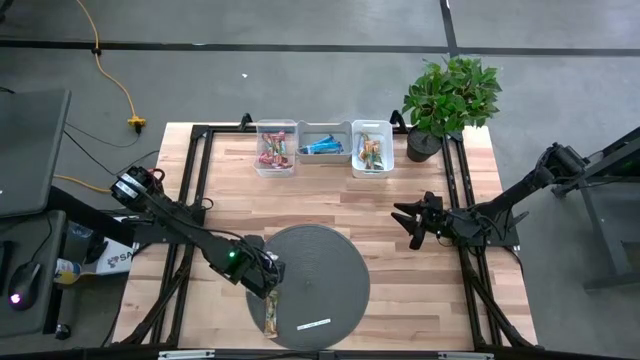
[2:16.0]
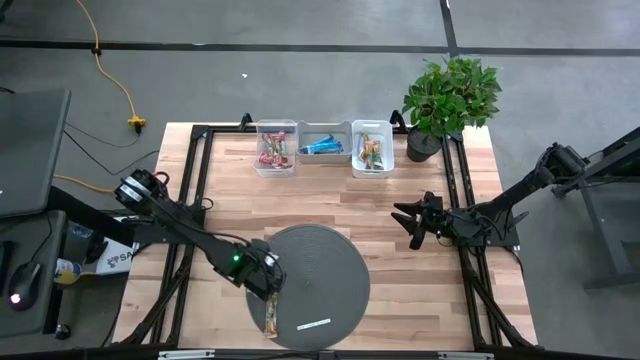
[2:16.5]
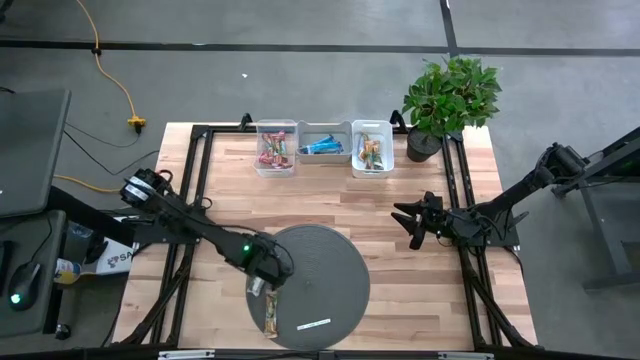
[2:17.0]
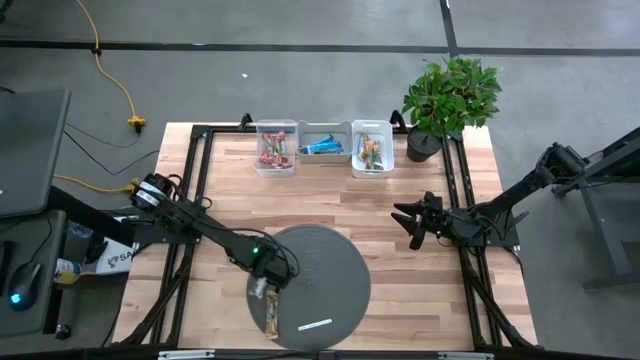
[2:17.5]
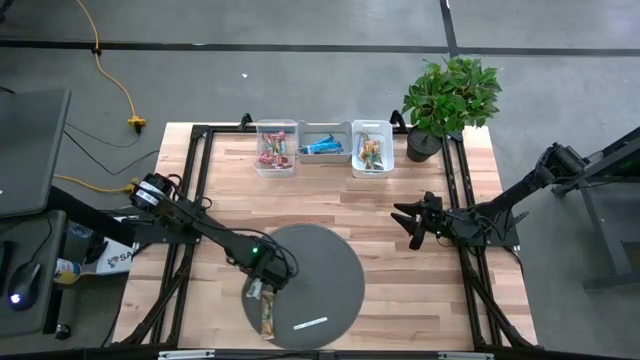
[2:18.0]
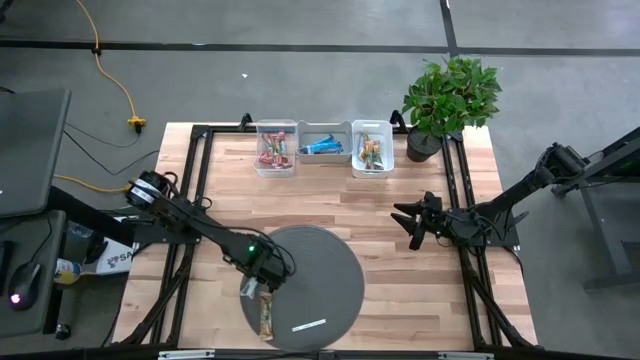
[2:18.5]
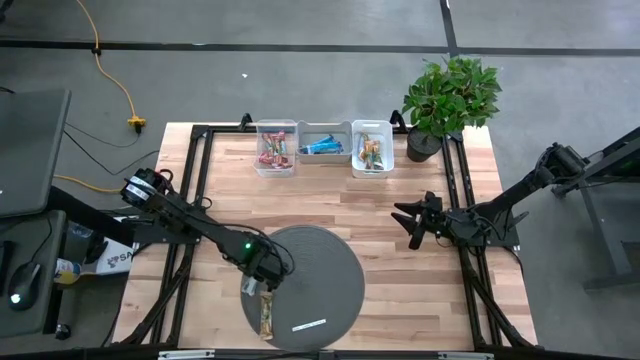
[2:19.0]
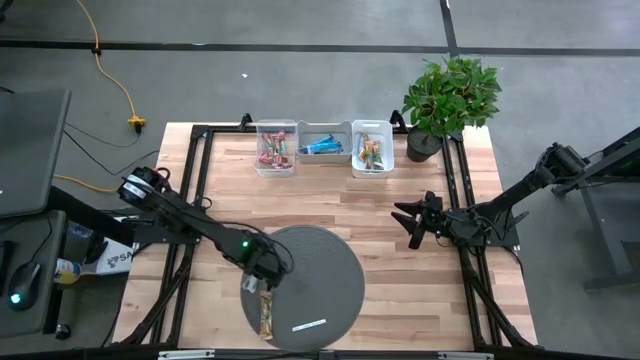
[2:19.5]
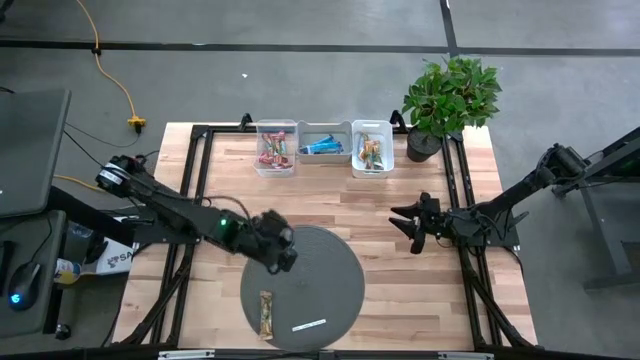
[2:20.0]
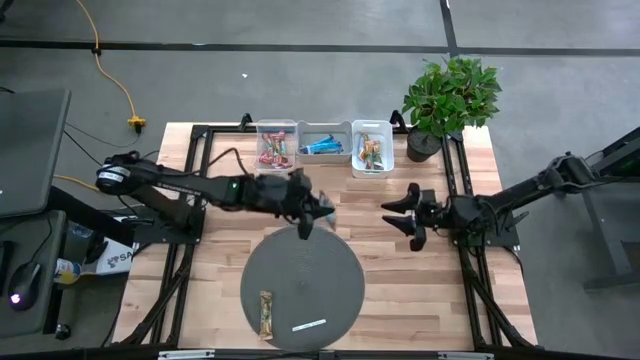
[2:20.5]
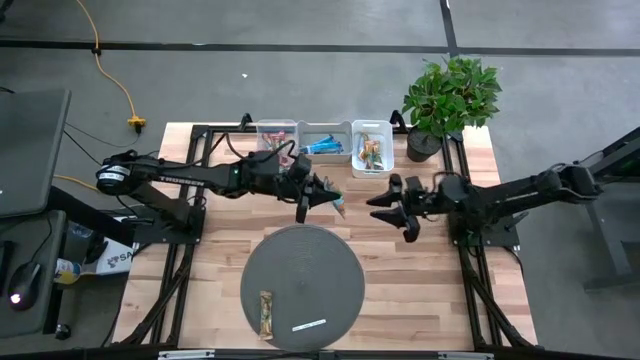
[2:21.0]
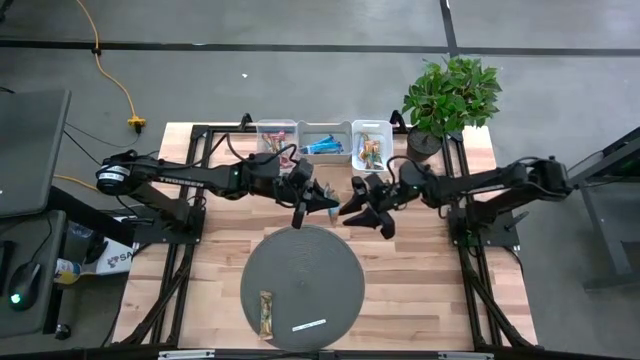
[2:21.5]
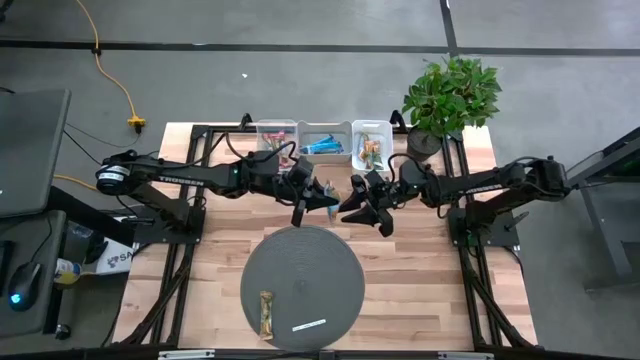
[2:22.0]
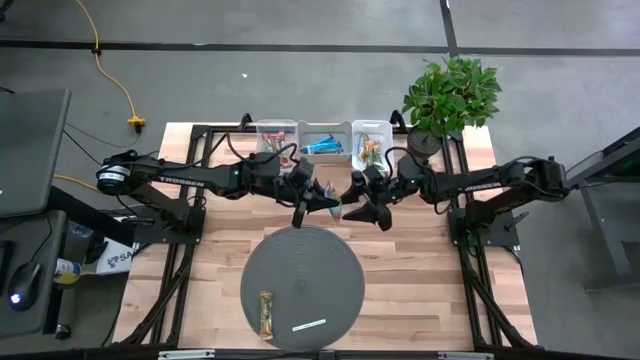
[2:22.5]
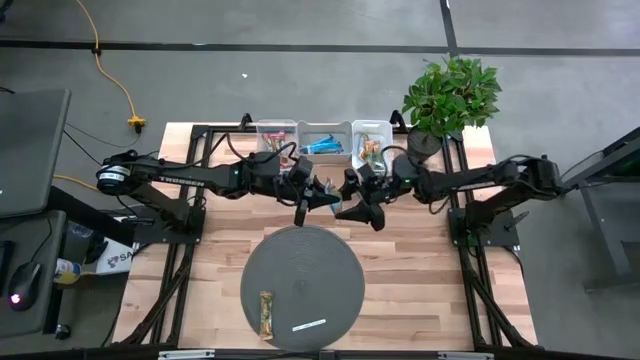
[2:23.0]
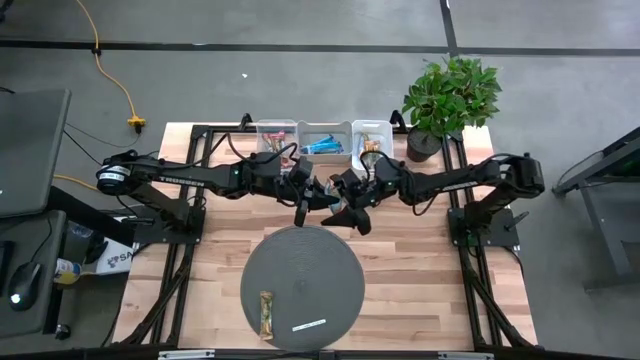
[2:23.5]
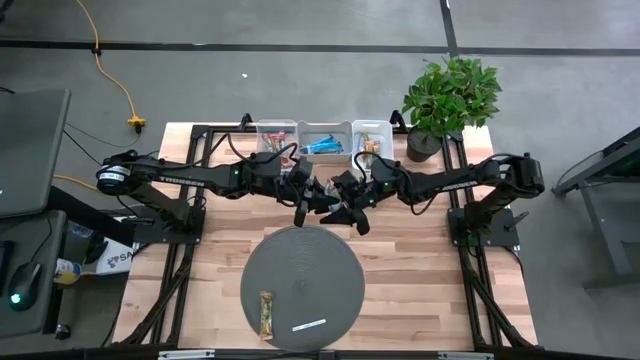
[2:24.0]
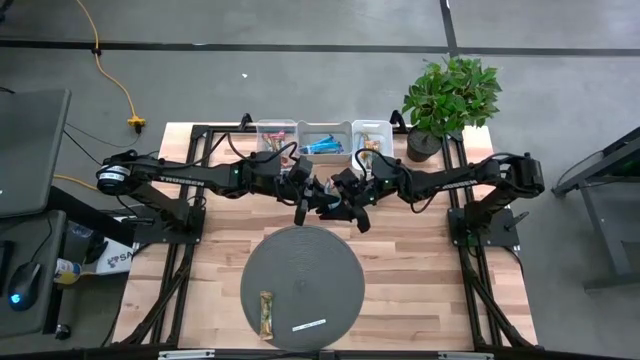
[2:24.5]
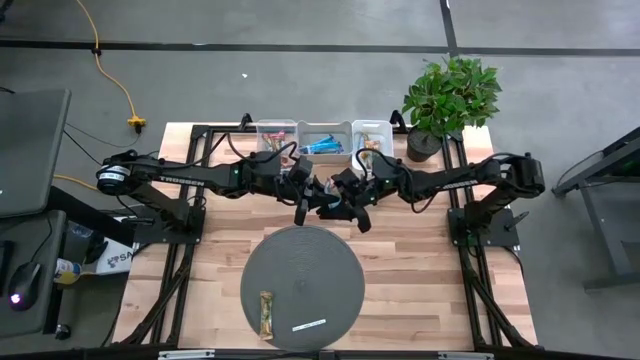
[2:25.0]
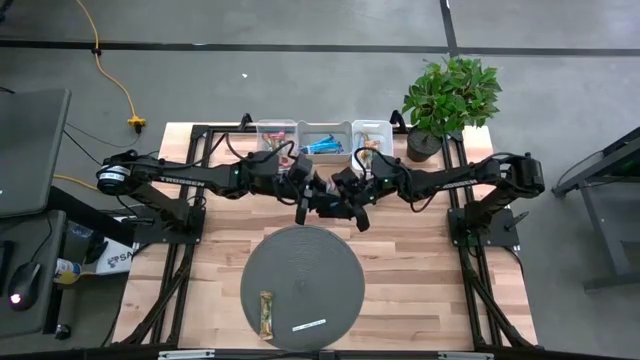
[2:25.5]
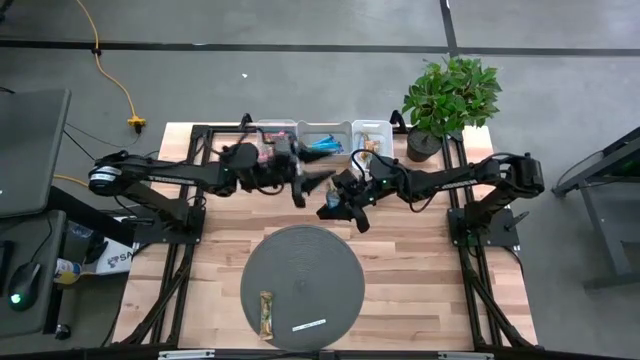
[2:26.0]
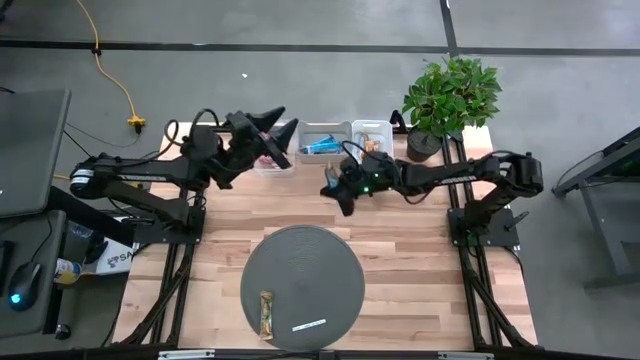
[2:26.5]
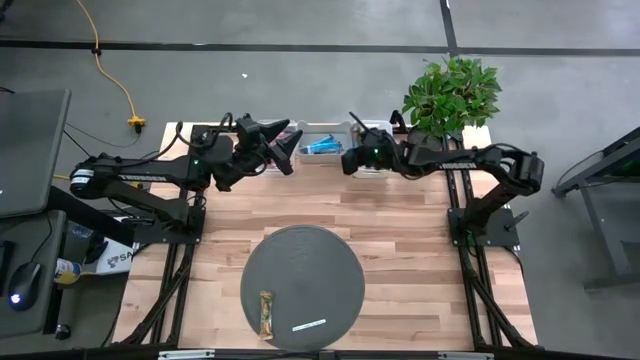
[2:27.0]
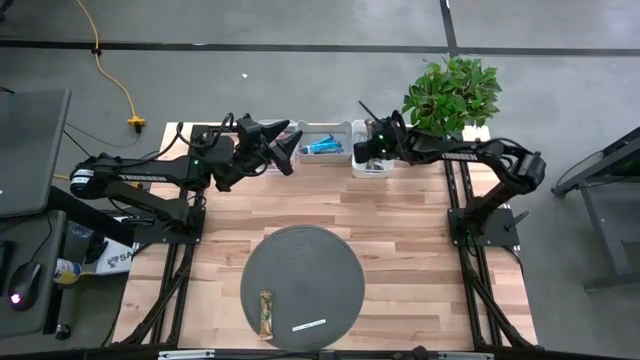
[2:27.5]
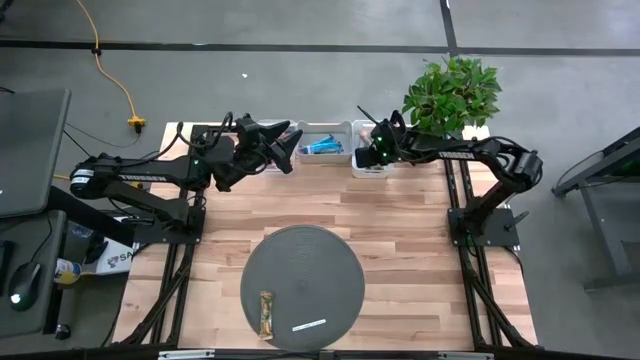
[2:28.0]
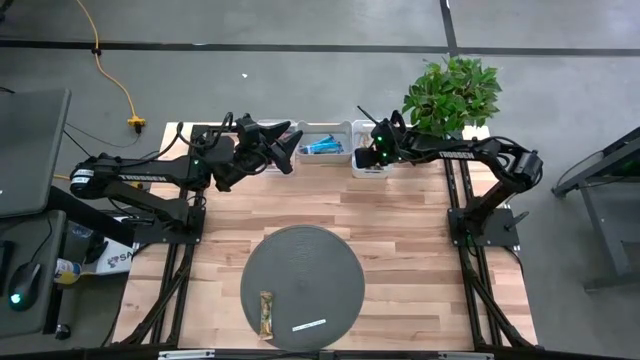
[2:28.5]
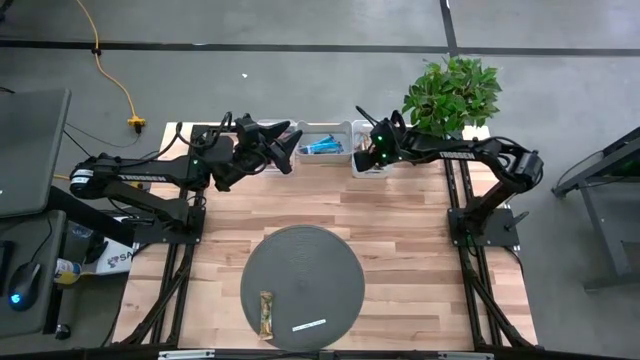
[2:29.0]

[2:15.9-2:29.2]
Task: Pick and place Granola Bars by type
Put the left orange granola bar into the white bin

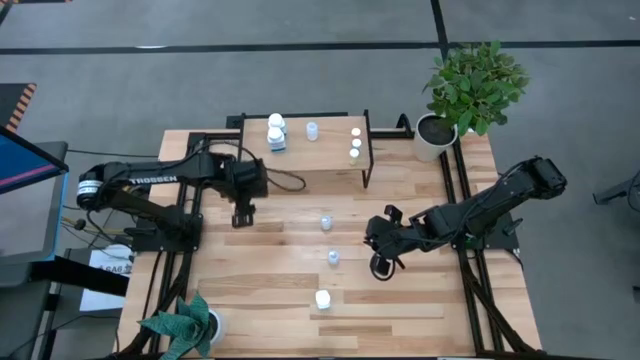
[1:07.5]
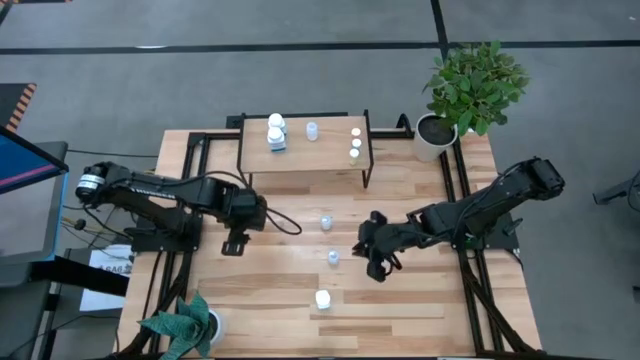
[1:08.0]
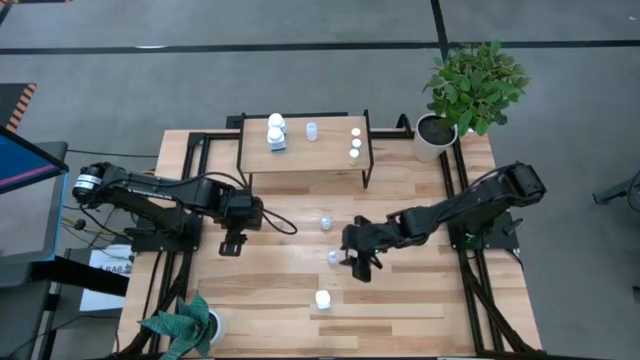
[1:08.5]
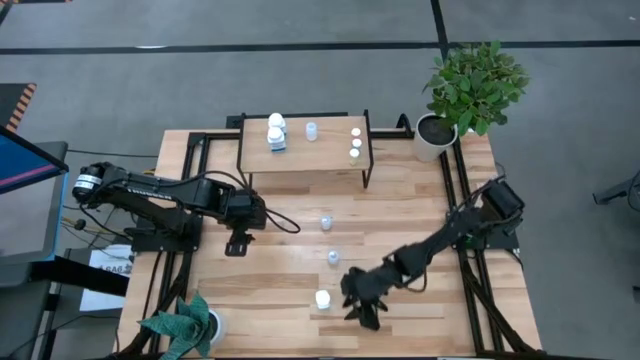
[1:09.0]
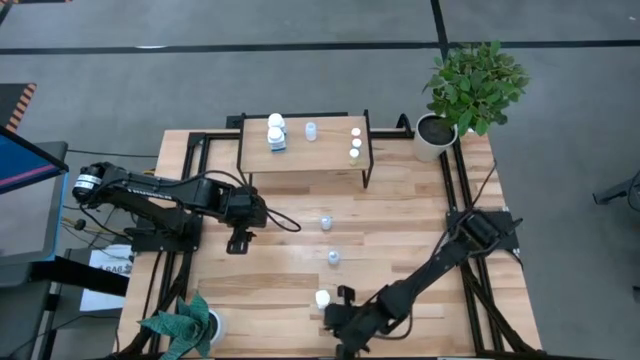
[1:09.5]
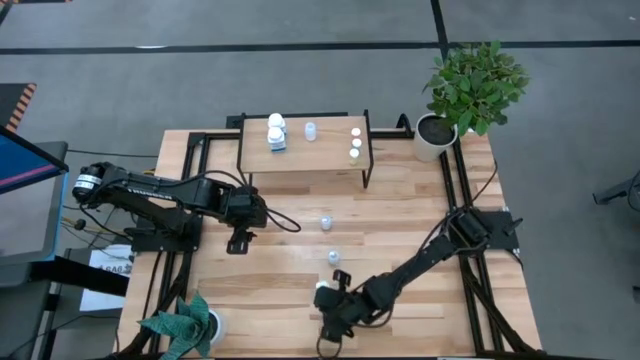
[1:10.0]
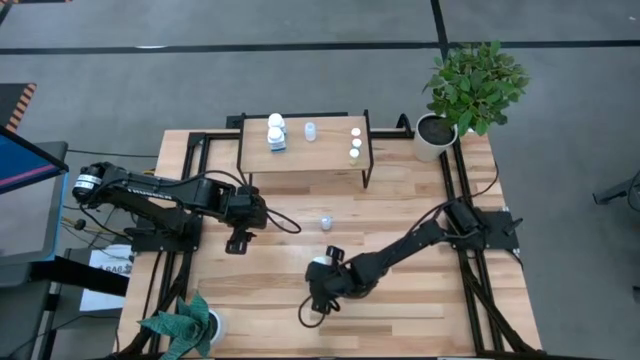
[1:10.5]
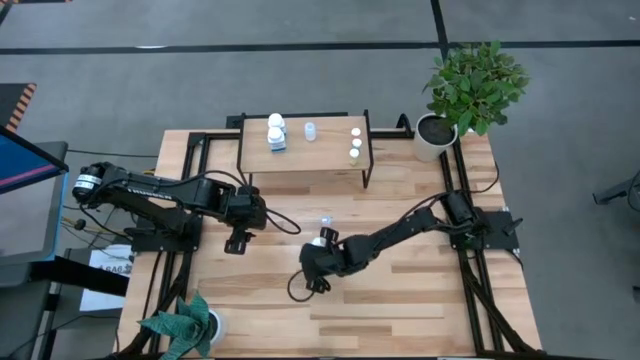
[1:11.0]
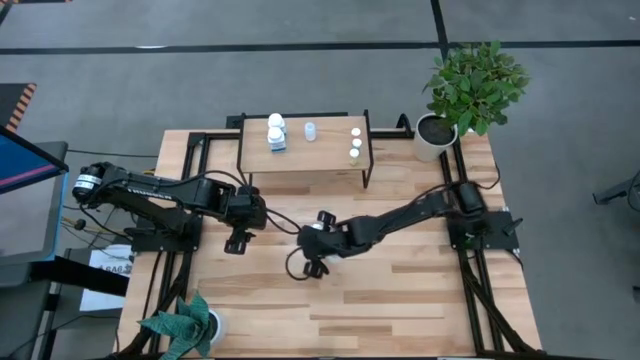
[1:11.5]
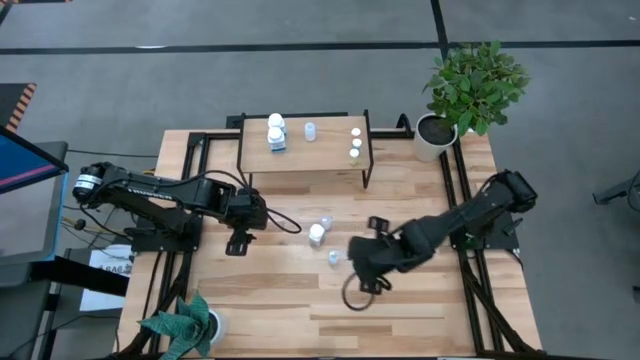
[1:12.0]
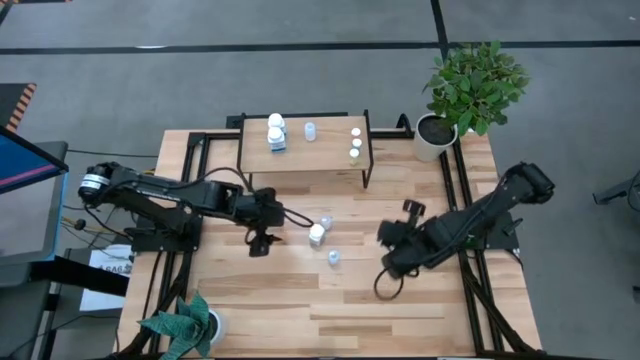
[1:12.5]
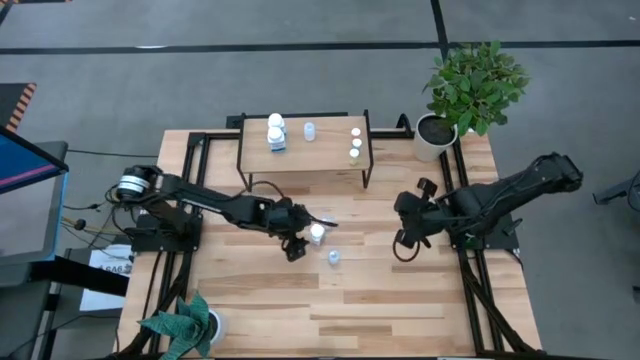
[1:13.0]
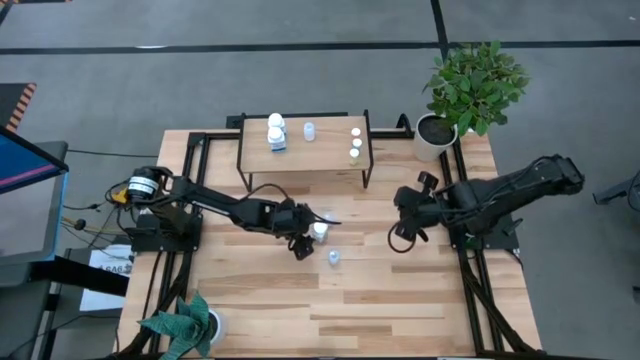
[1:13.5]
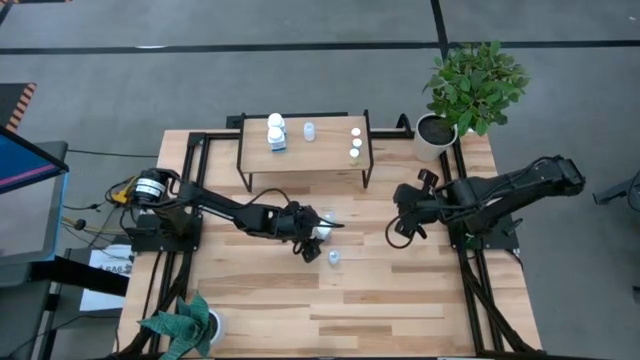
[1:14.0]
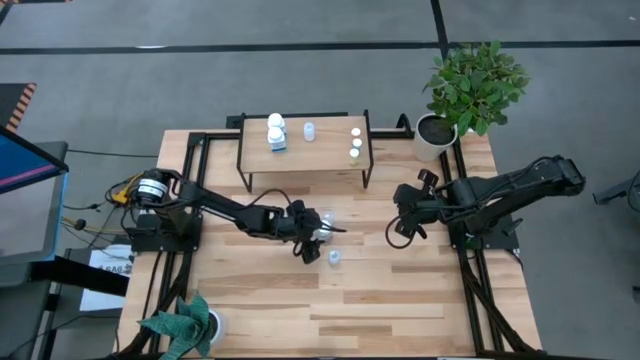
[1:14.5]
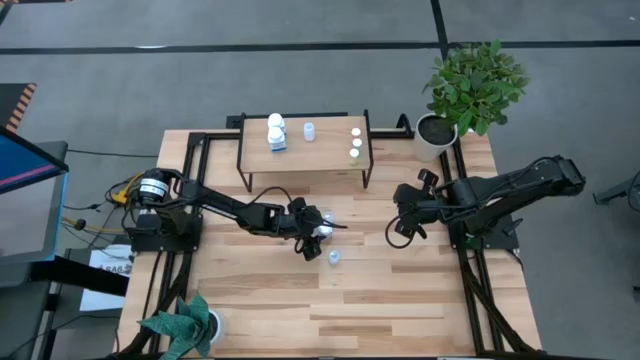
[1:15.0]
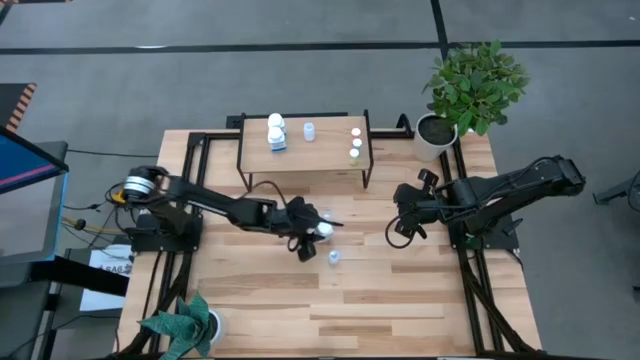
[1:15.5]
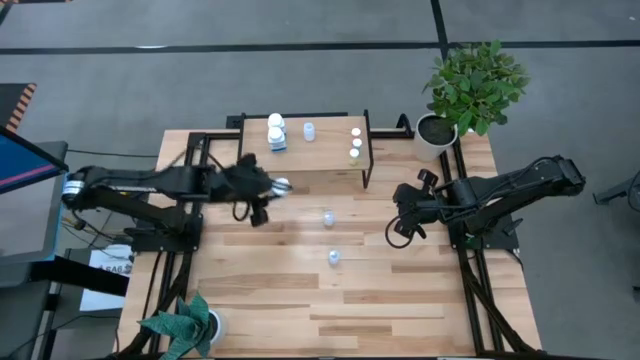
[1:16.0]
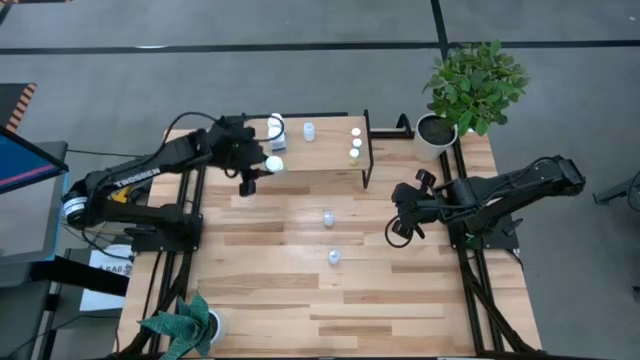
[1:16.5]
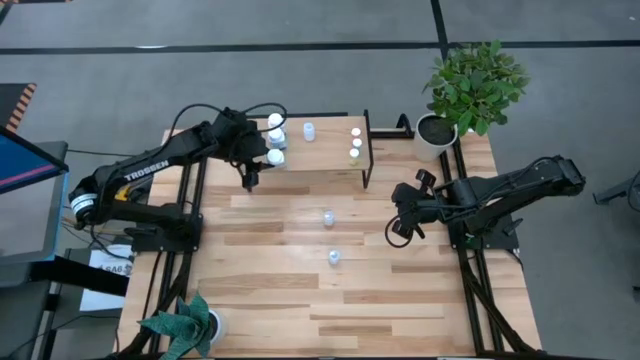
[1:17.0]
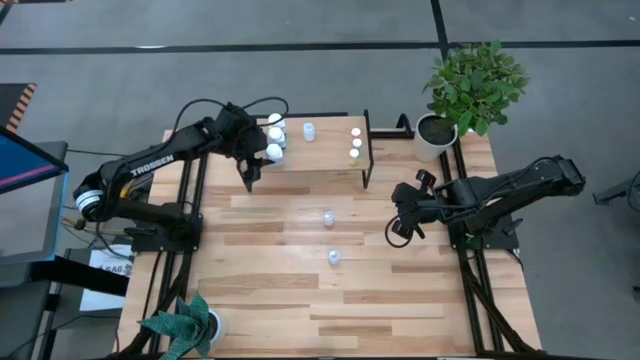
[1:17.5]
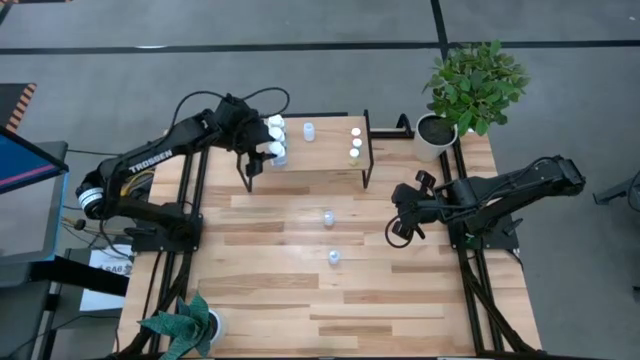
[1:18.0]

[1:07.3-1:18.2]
Task: Pick and place medicine bottles onto shelf by color
Put the white pill bottle on the shelf aligned with the other white pill bottles
